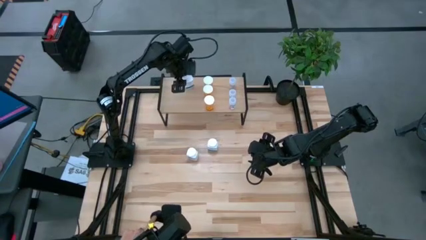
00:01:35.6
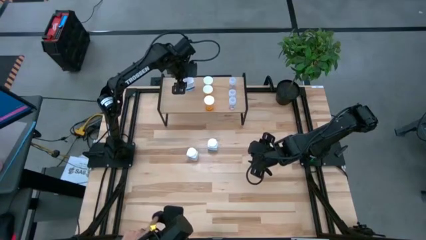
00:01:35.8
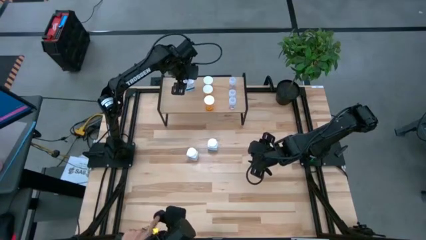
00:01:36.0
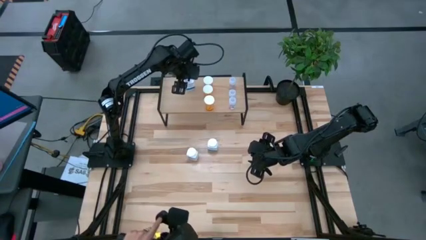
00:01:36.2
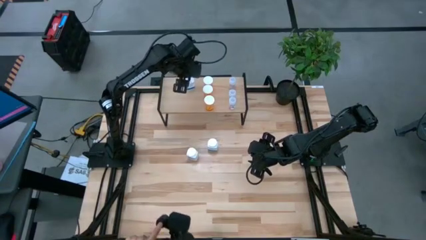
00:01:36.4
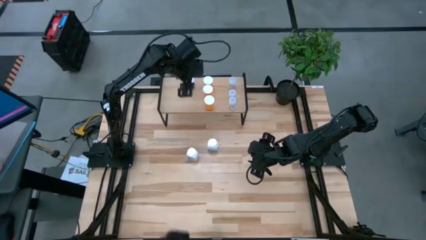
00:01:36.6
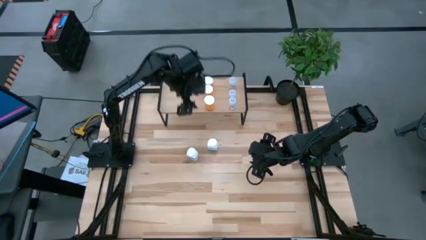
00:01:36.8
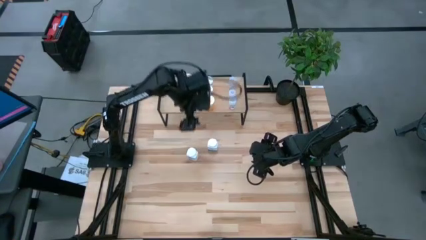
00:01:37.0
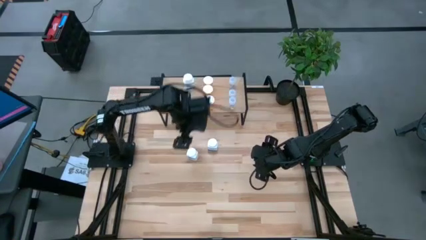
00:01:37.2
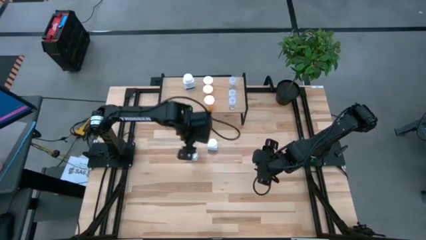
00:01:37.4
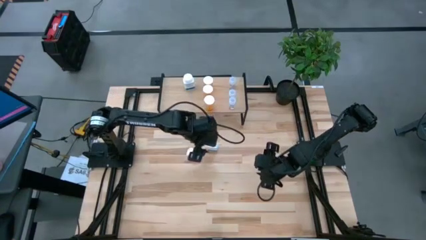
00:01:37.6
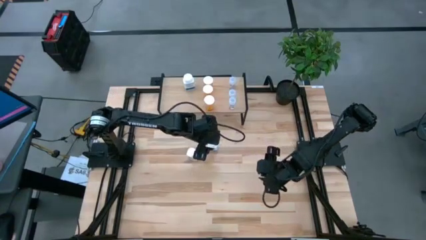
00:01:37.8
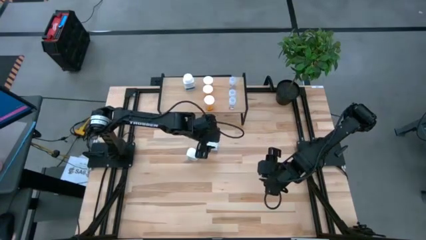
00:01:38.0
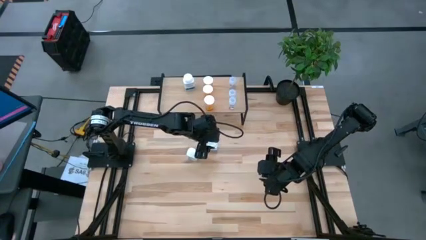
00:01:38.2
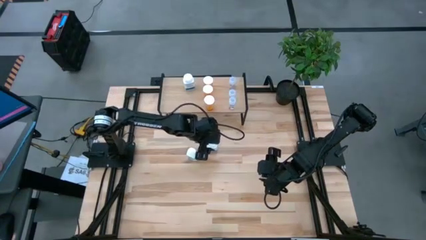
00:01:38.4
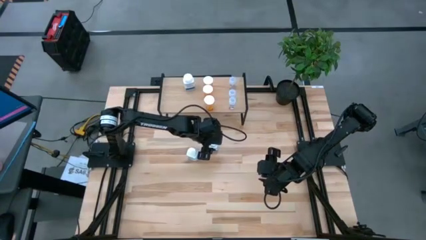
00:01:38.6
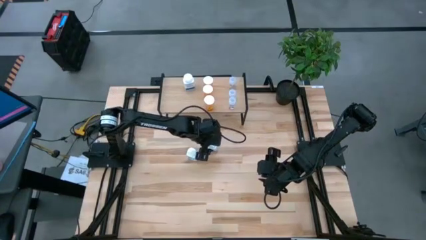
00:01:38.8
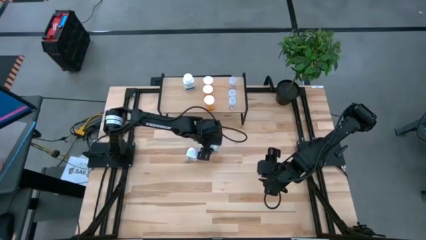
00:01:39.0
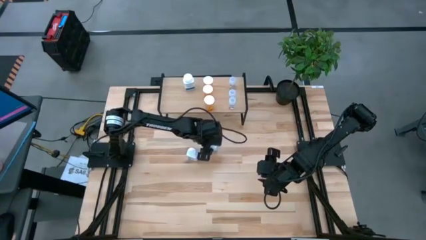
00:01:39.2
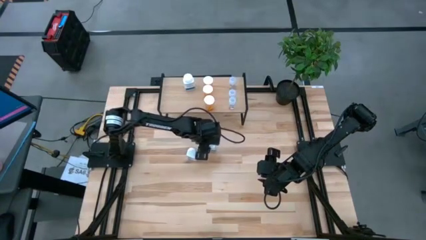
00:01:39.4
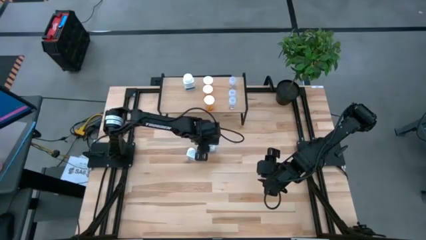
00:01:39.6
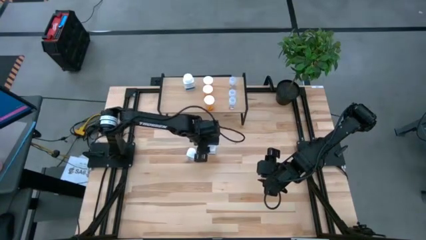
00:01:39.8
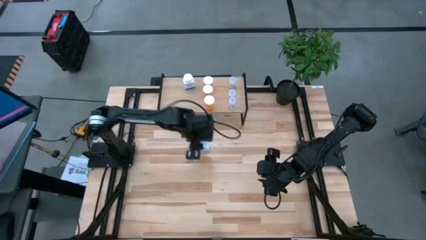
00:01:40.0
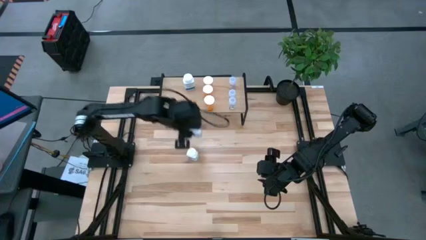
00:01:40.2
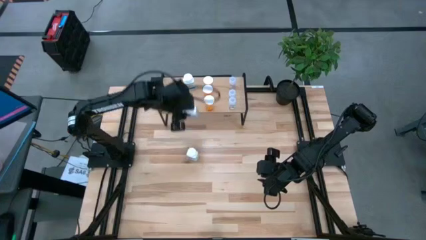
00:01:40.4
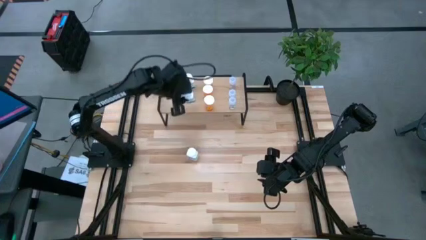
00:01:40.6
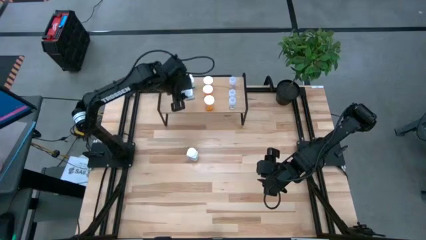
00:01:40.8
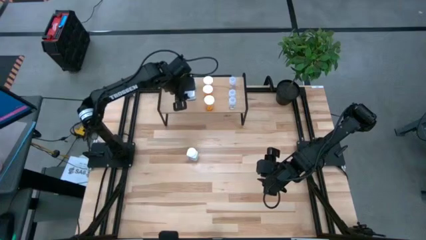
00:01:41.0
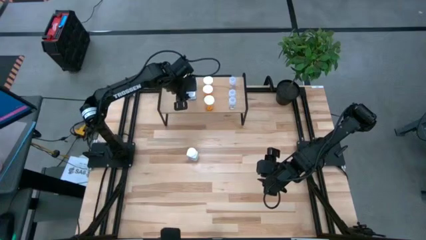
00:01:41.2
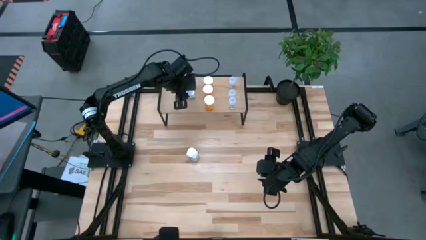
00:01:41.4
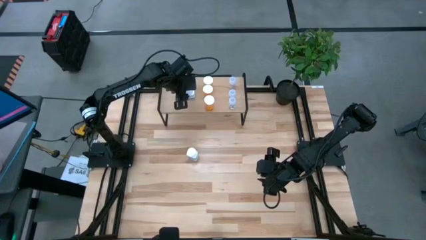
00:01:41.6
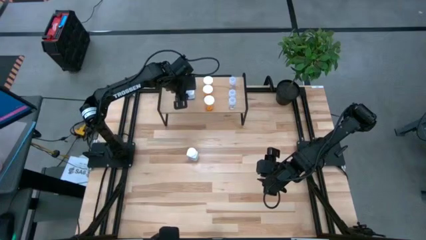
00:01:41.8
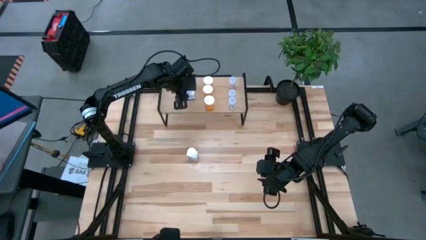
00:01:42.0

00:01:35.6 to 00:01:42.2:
Task: Pick and place medicine bottles onto shelf by color
Put the top white pill bottle aligned with the other white pill bottle on the shelf

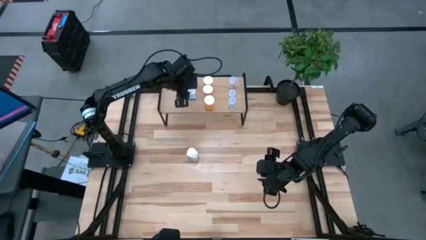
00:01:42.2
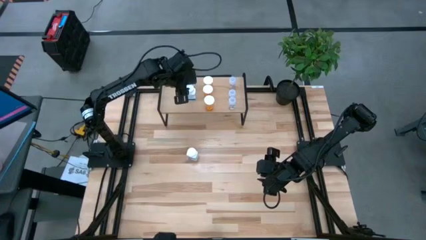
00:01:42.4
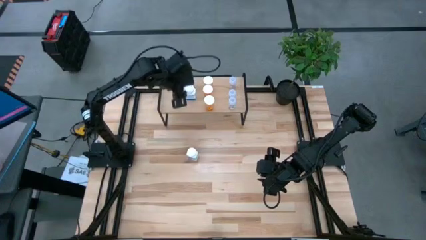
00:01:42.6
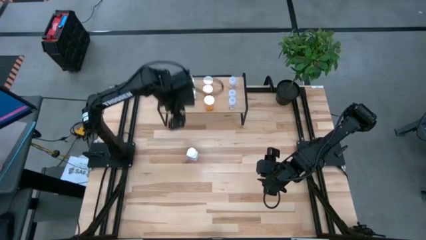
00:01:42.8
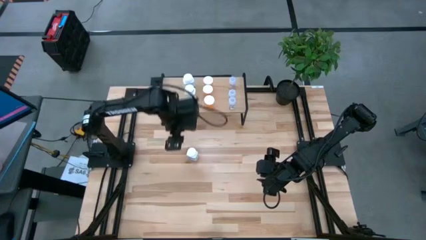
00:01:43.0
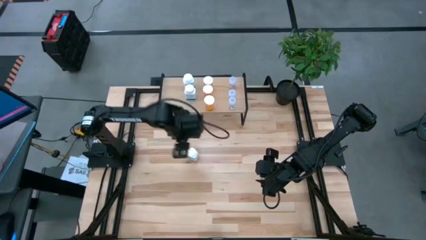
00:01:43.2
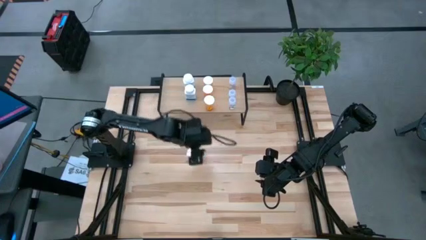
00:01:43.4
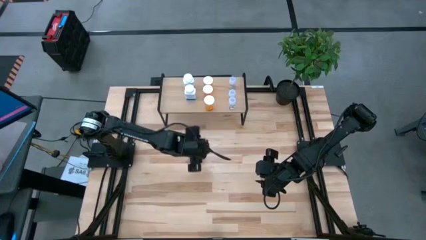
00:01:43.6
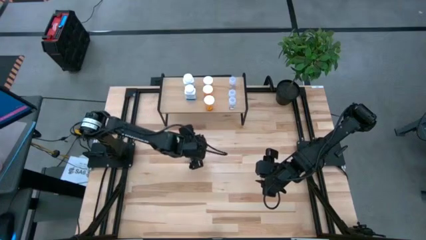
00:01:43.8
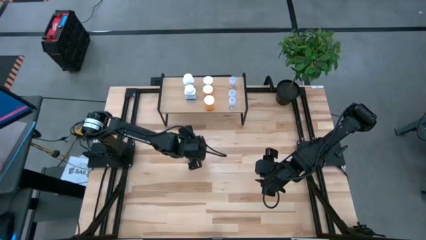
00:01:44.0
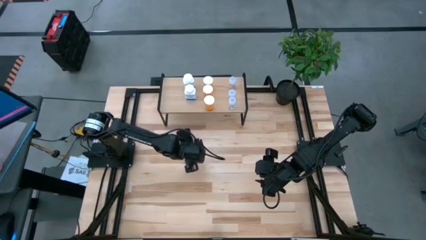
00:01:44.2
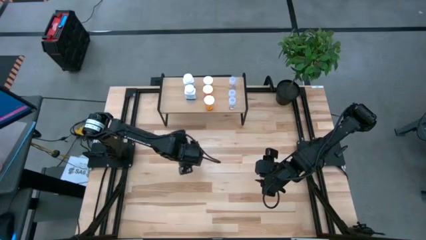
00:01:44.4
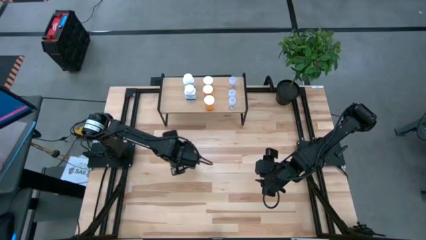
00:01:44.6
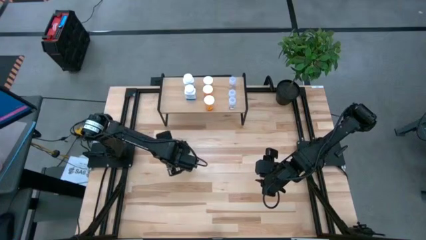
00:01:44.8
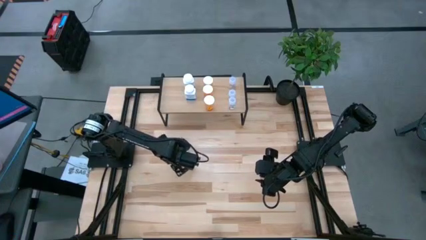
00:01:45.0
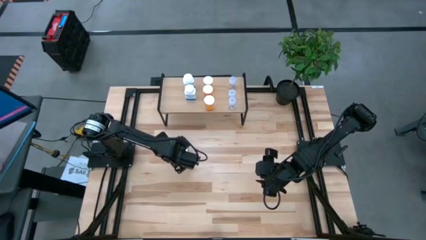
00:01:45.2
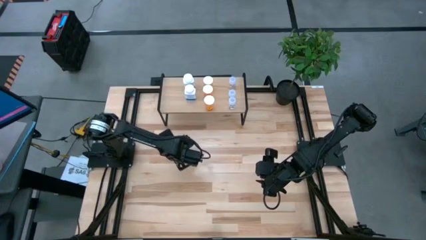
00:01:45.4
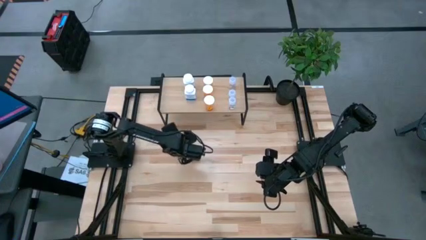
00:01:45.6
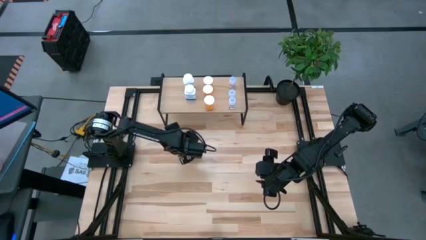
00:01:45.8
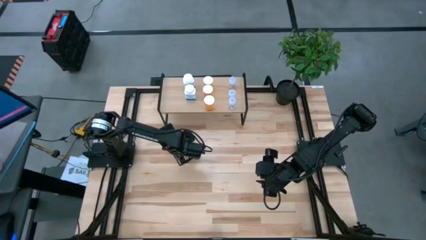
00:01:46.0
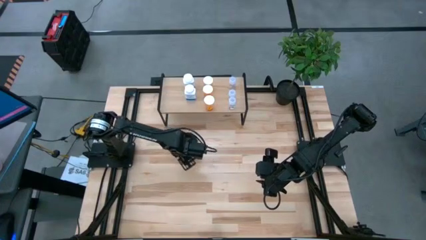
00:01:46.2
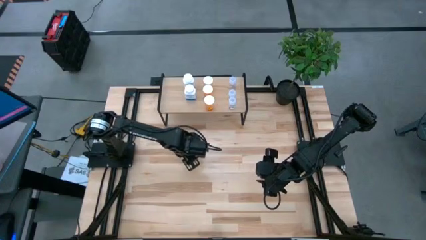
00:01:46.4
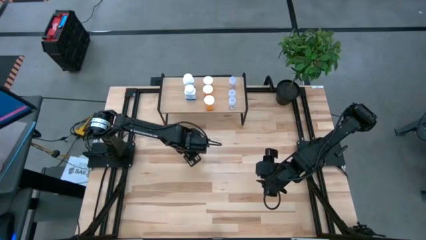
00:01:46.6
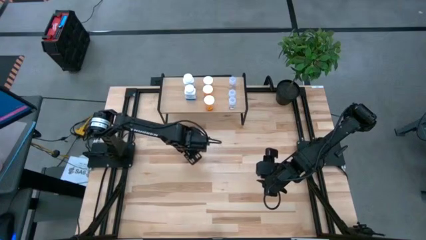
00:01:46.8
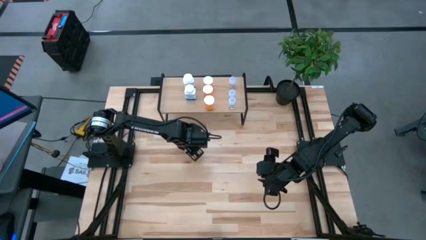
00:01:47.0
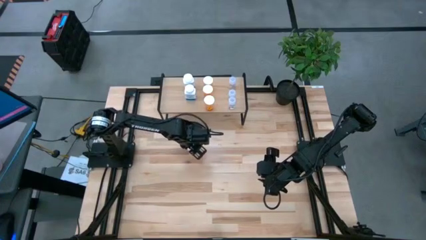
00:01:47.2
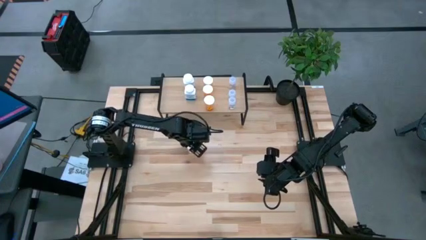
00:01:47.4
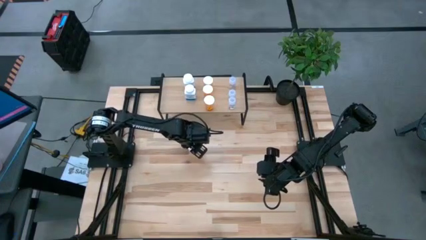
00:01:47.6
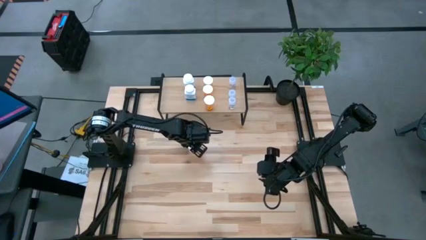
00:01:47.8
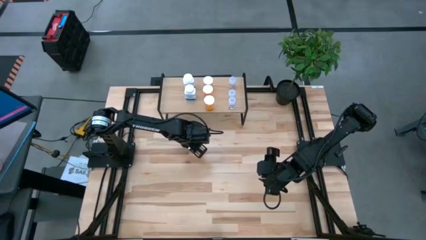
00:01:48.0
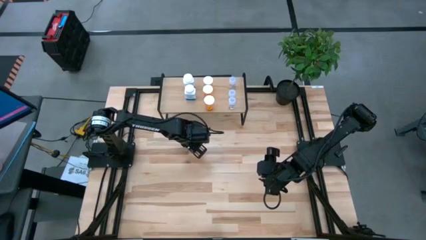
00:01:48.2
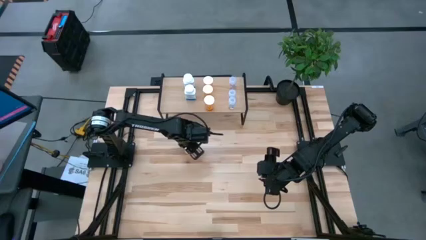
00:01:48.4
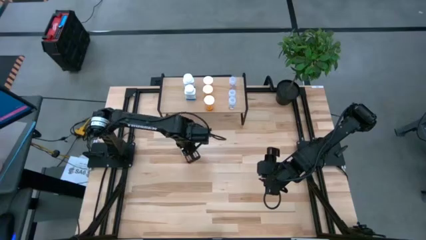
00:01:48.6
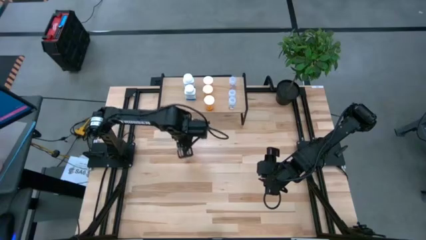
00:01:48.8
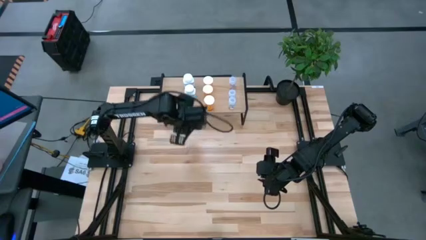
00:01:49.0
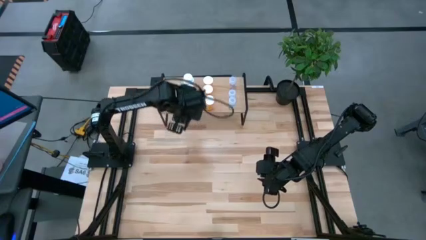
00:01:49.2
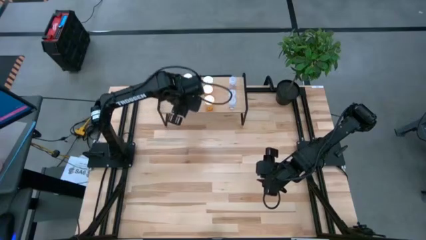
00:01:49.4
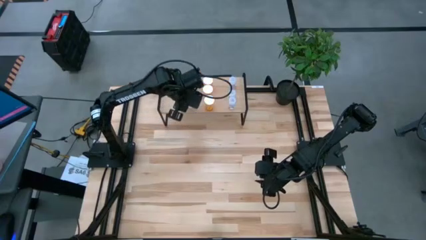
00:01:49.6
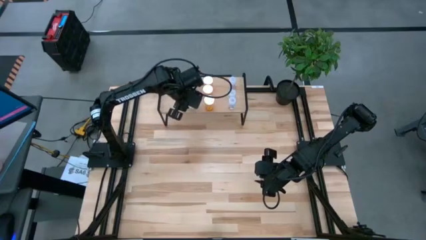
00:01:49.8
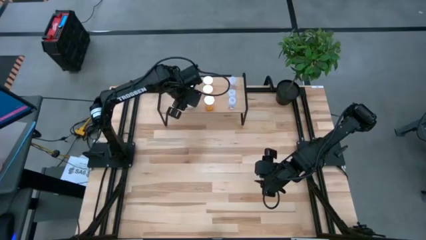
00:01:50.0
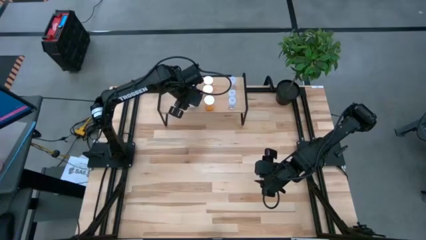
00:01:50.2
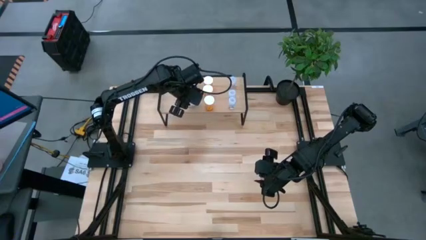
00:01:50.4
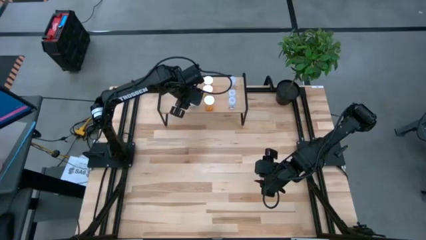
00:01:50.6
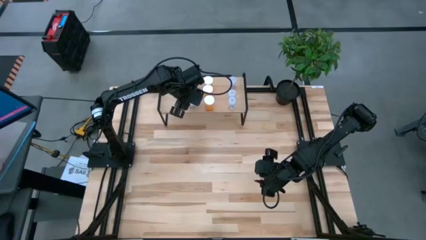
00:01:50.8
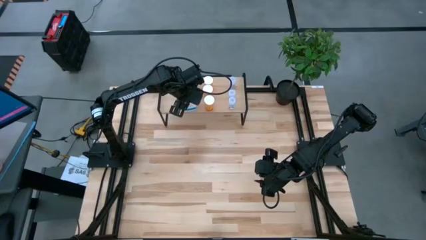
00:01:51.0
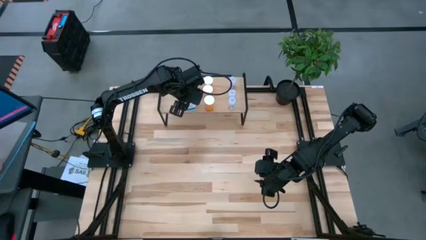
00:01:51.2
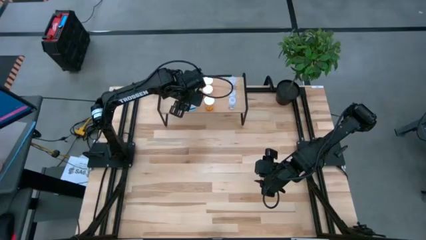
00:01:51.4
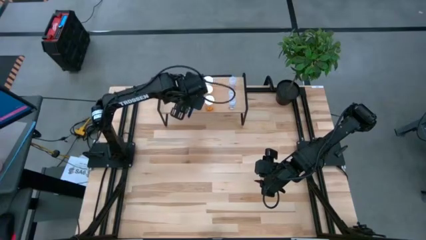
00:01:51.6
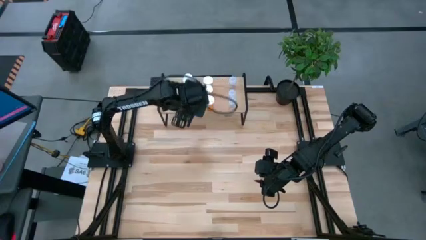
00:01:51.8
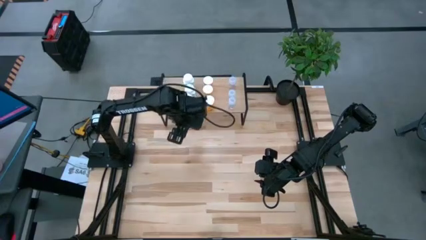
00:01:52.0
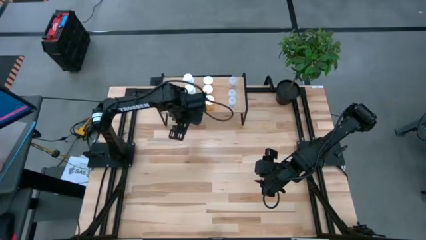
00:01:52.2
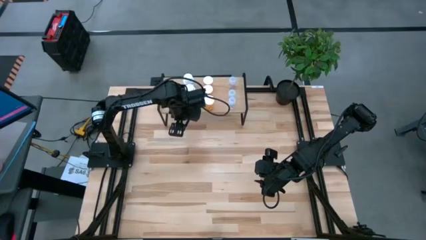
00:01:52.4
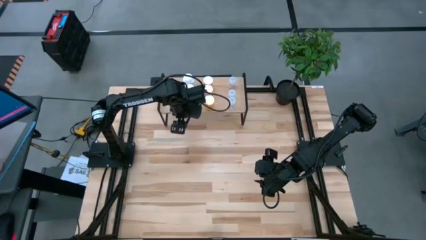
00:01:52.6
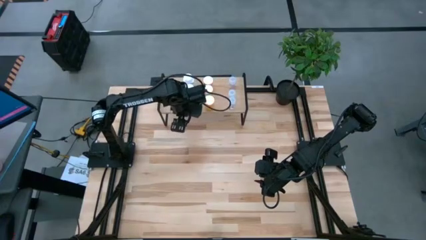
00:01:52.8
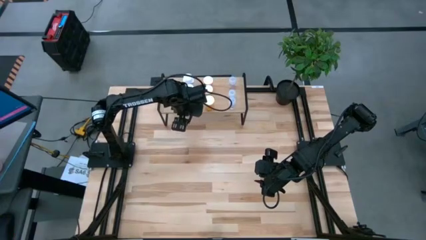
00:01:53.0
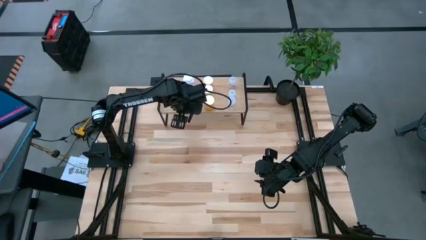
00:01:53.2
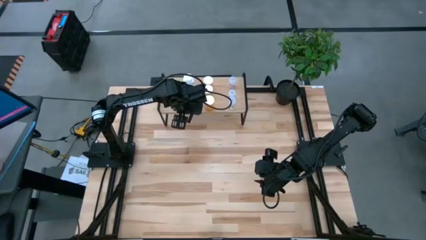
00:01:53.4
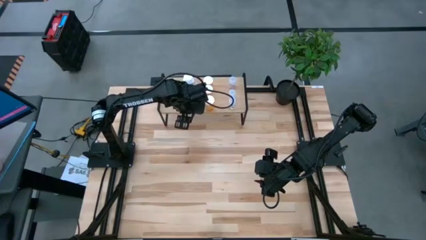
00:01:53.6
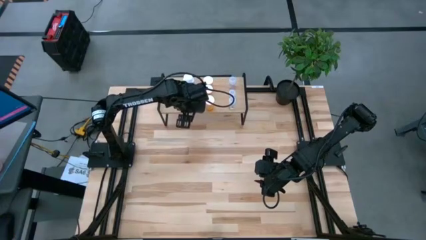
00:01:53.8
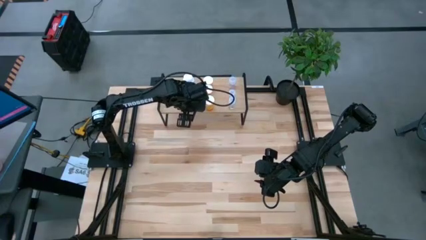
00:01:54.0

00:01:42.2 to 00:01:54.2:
Put the white pill bottle aligned with the other white pill bottles on the shelf
